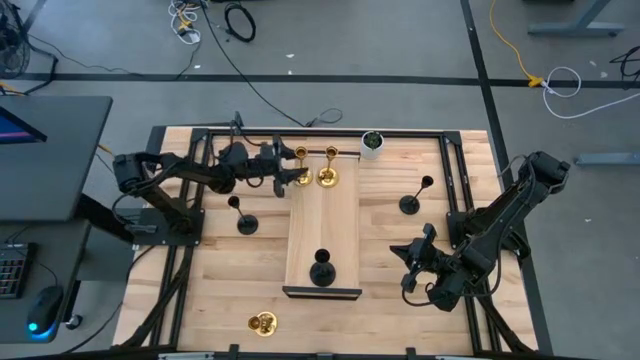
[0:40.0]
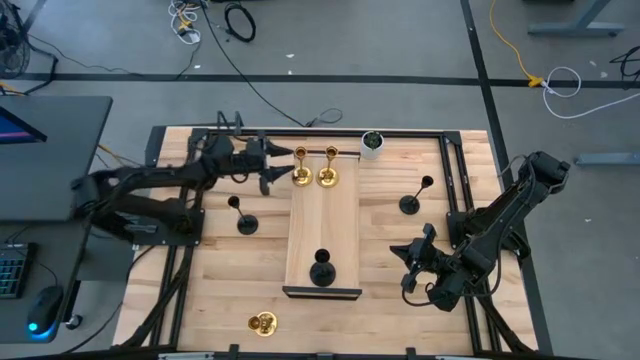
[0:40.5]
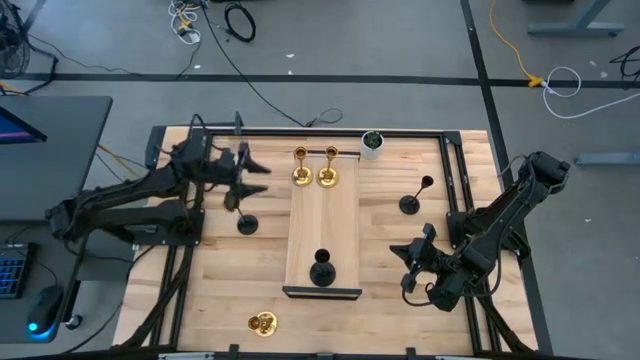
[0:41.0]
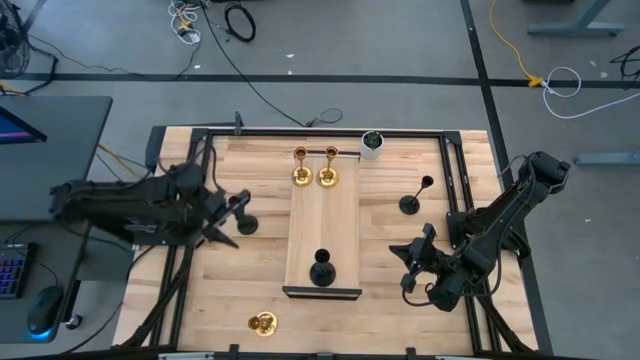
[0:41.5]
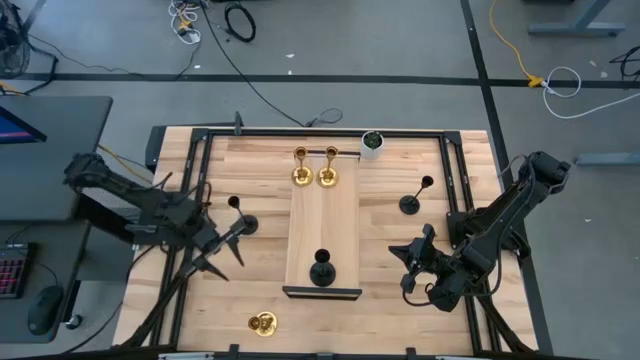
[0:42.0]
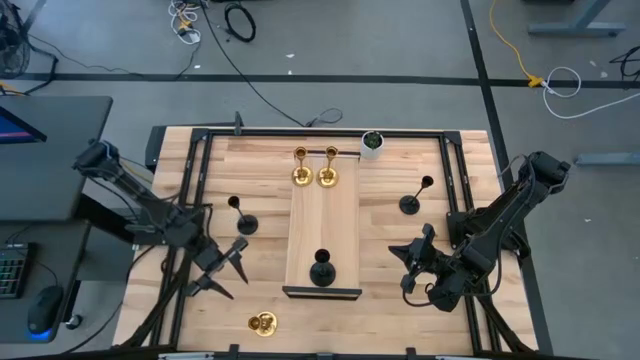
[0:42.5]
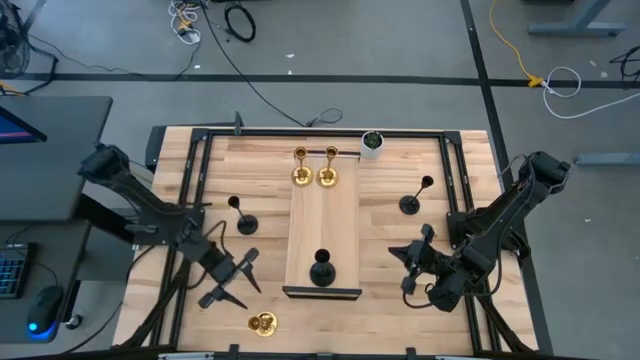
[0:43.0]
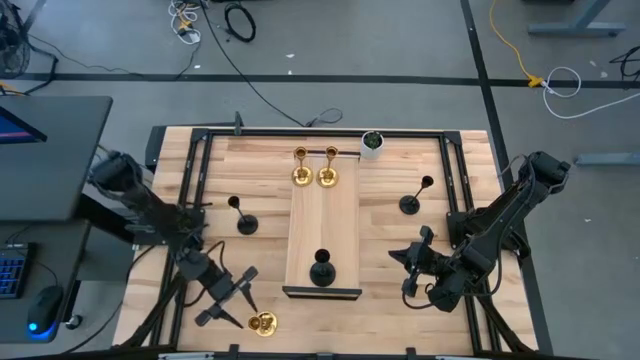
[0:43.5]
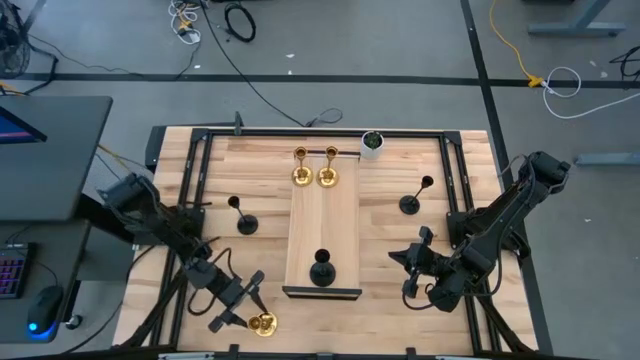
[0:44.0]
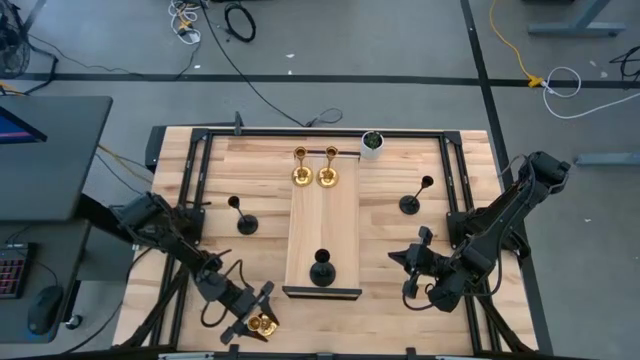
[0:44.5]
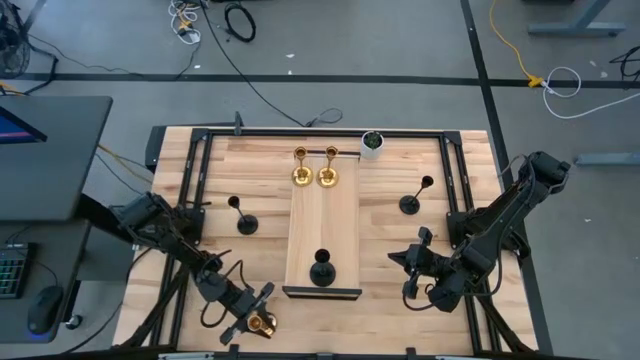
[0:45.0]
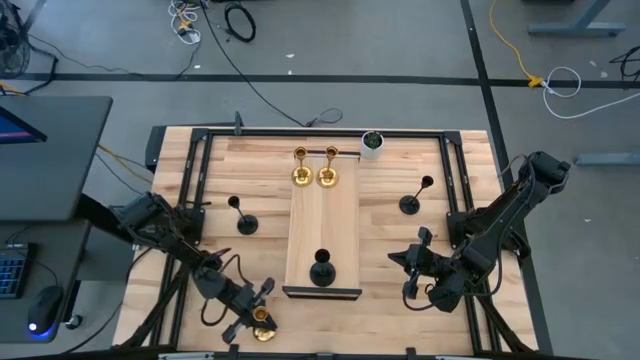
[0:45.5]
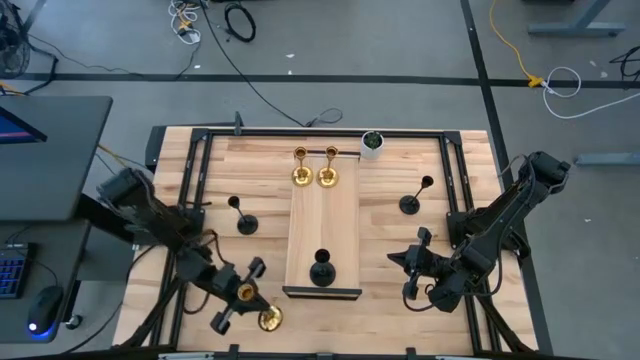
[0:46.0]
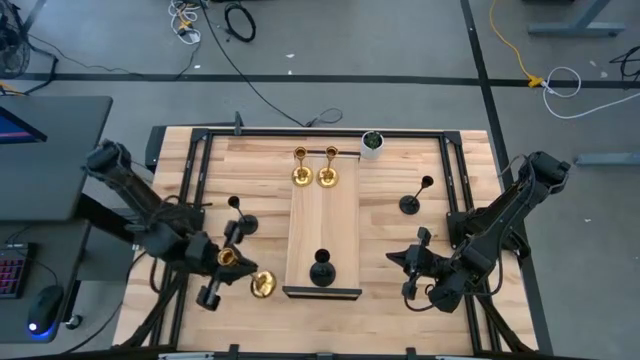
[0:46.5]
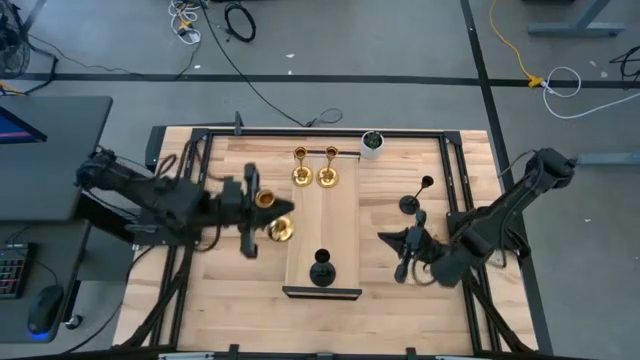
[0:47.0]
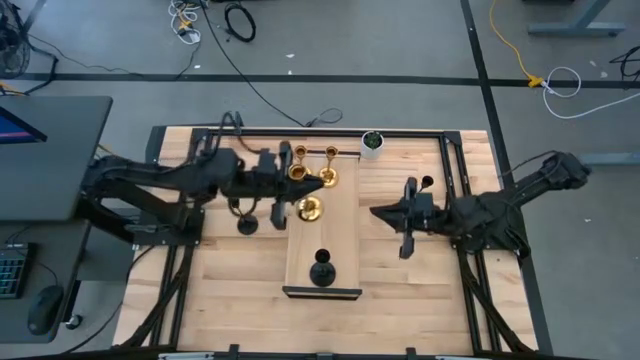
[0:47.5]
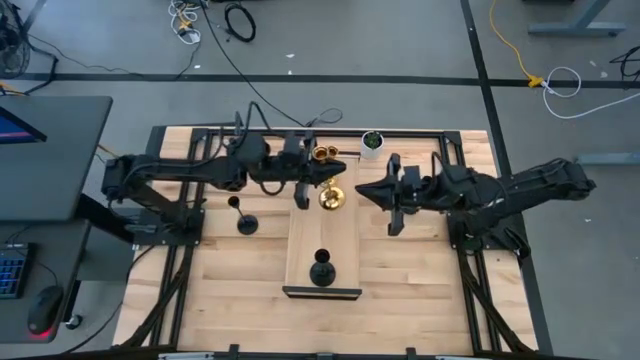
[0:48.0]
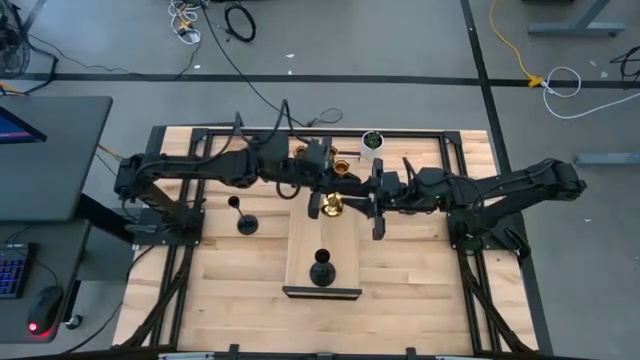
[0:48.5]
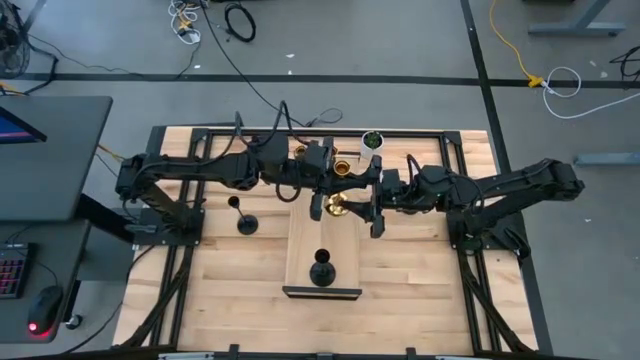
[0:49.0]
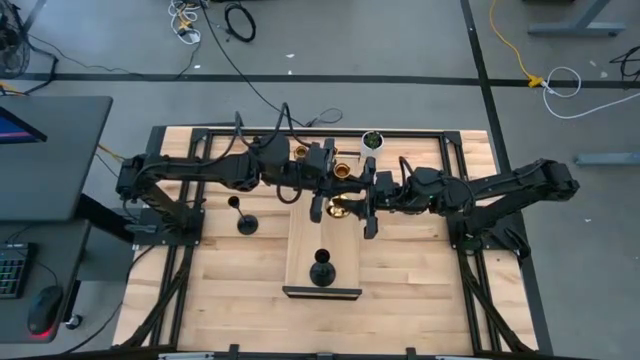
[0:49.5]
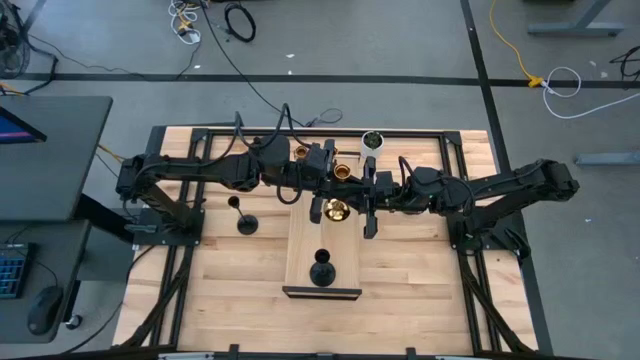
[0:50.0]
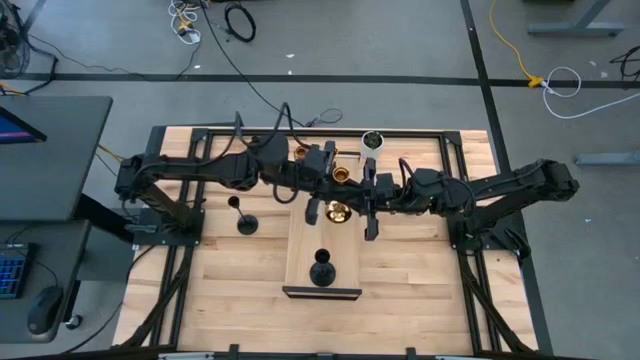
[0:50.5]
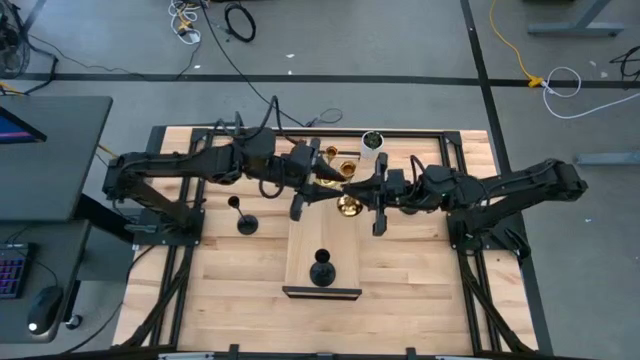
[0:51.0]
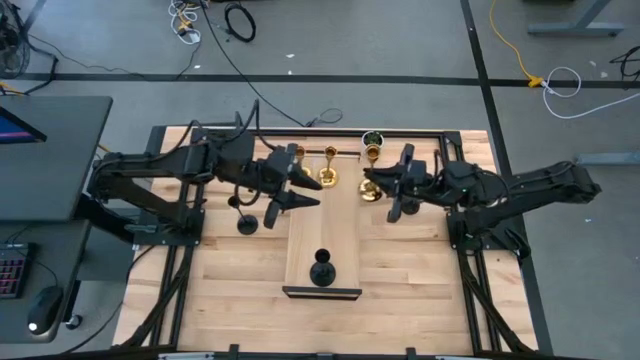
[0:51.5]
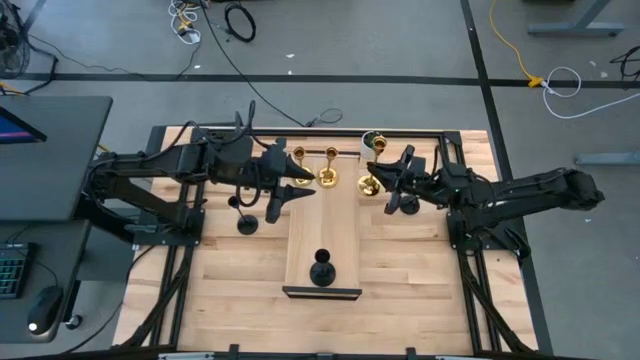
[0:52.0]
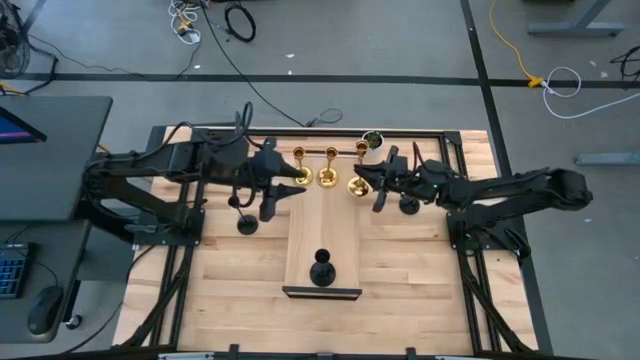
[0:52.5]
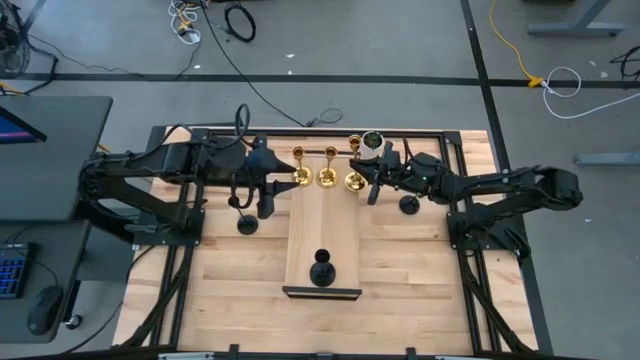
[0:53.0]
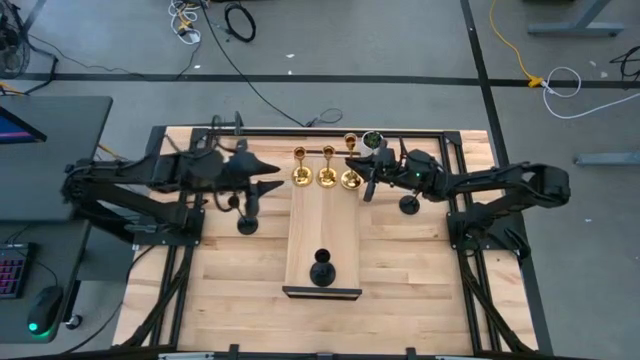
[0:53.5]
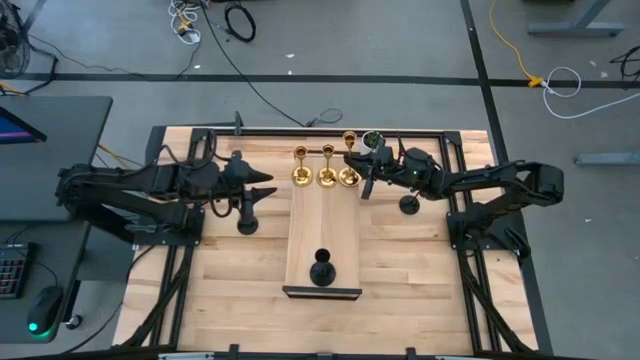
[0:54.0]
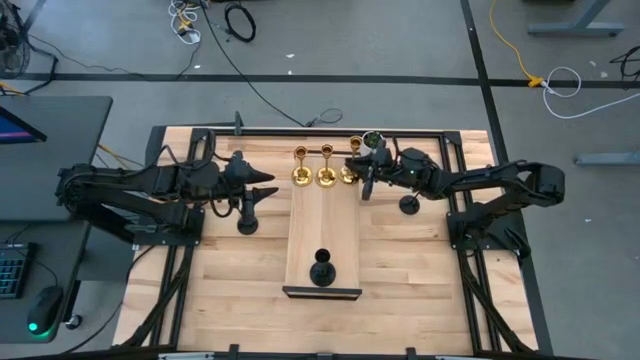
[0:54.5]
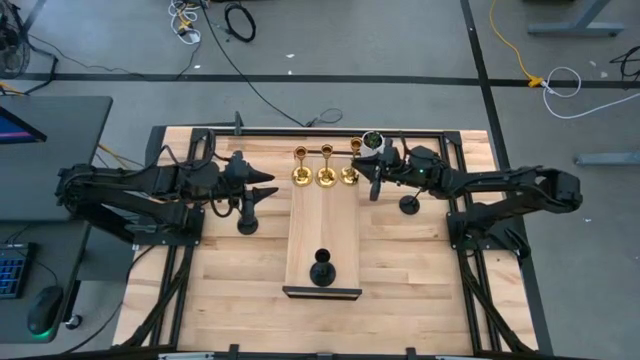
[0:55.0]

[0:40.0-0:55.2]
Task: Pick & Place candle stick holders
Put the golden candle holder aligned with the golden candle holder on the shelf

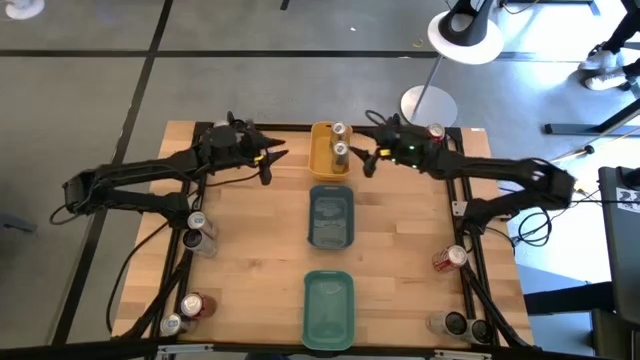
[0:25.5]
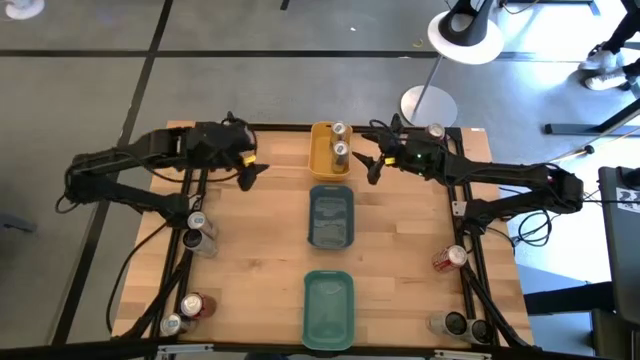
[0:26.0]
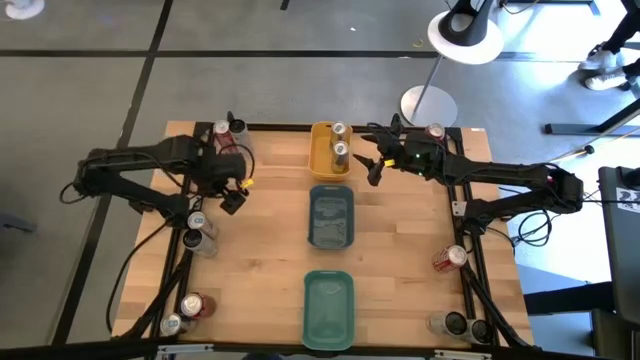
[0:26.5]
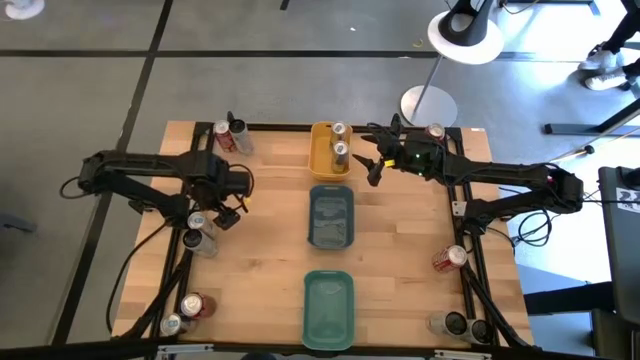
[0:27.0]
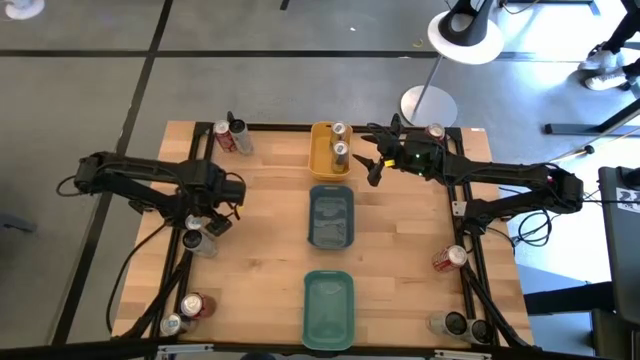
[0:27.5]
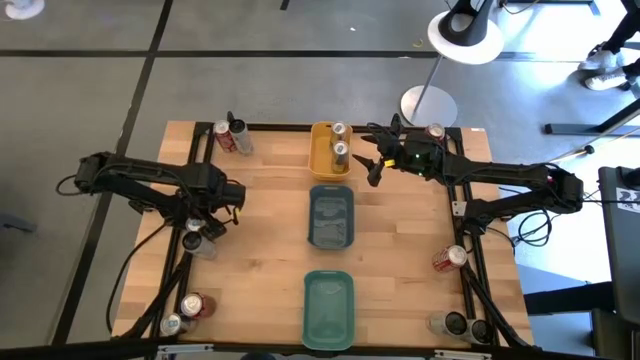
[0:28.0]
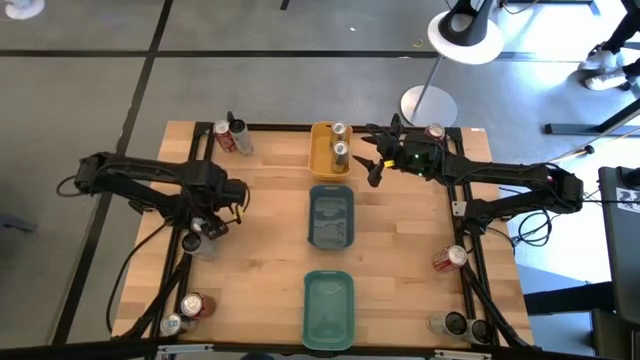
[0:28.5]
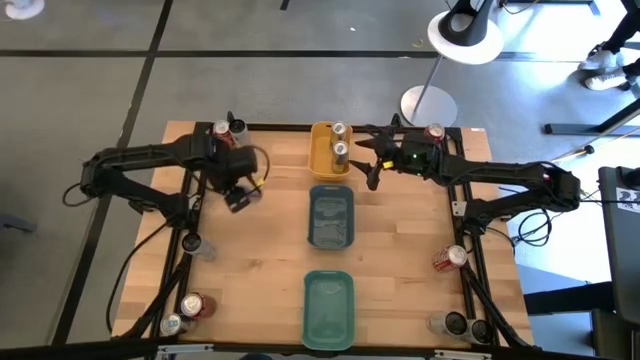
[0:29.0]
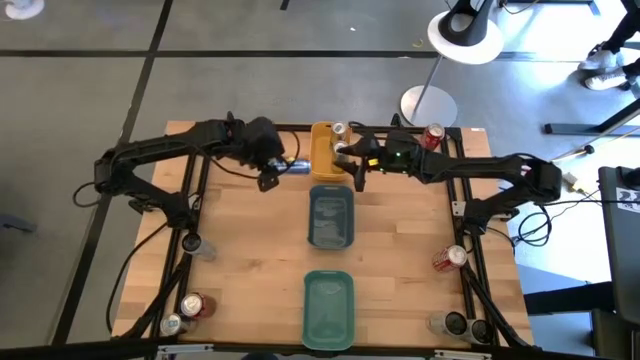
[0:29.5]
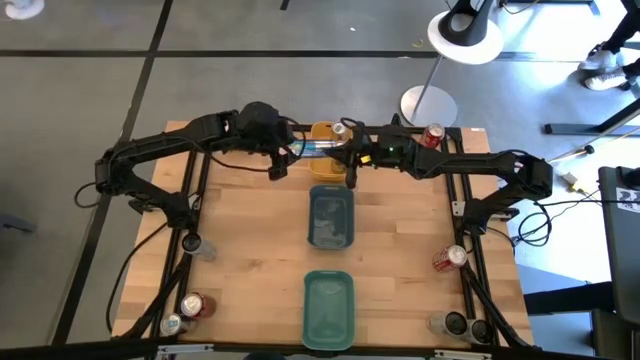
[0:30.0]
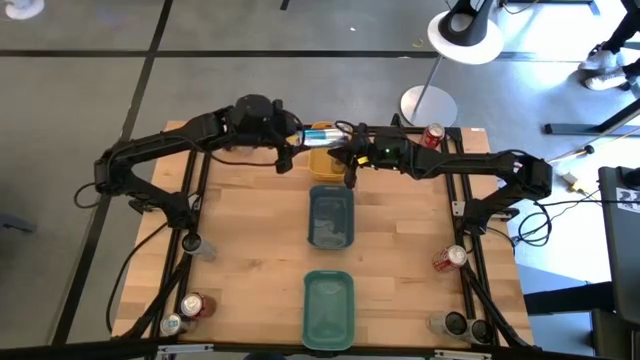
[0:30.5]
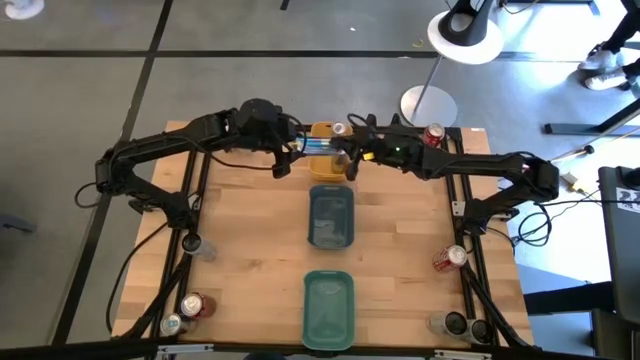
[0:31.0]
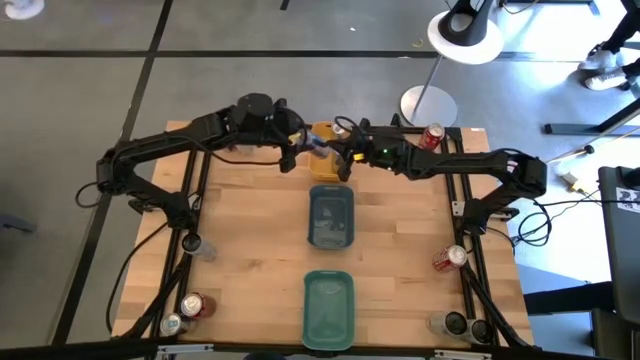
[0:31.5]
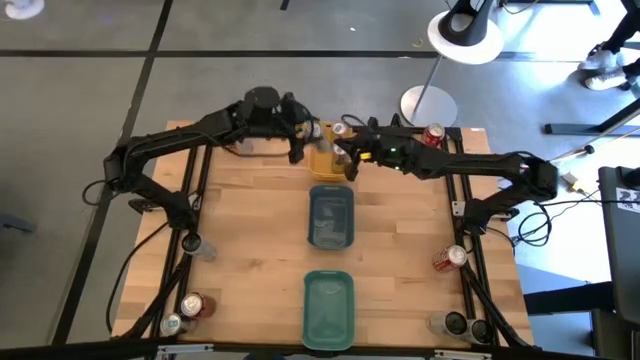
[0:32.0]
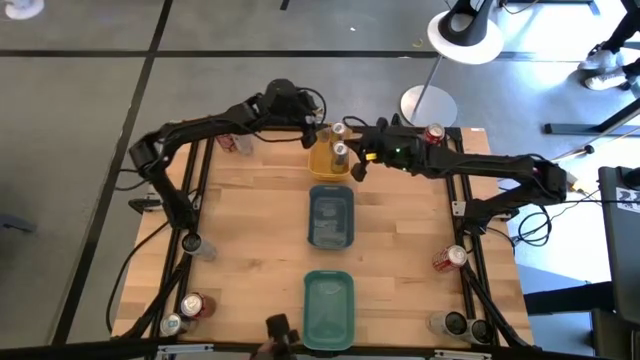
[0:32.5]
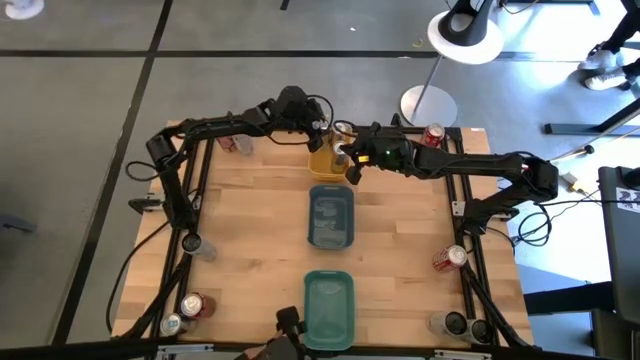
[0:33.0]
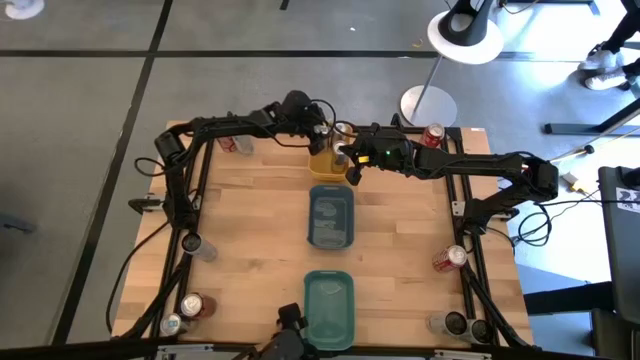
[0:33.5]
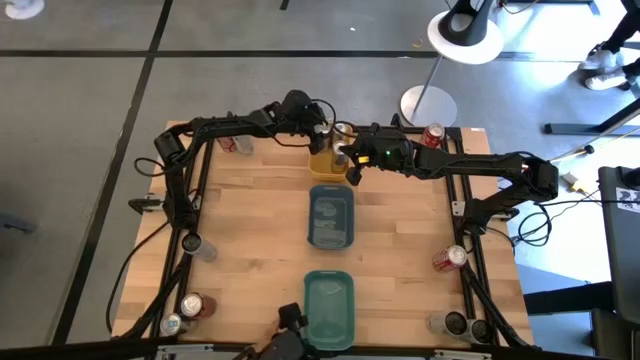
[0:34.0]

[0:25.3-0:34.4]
Task: Sort soda cans
Put the top blue soda can into the yellow bin
